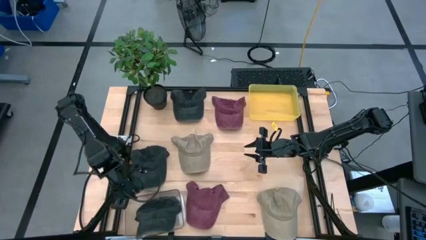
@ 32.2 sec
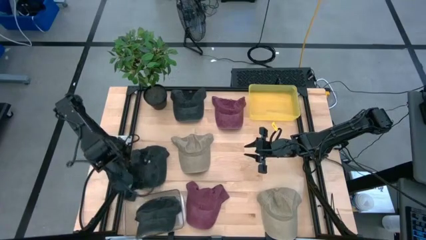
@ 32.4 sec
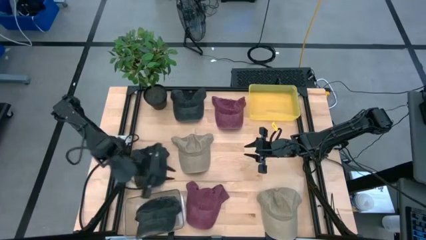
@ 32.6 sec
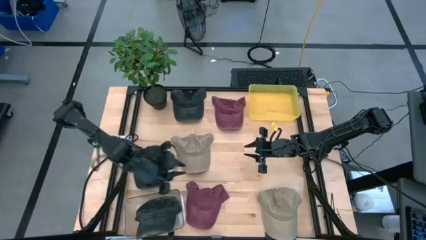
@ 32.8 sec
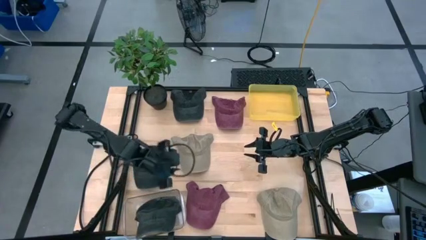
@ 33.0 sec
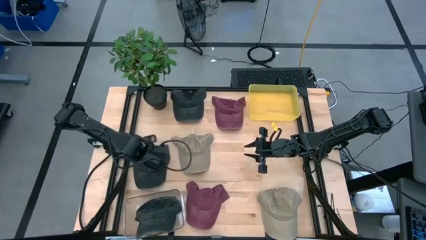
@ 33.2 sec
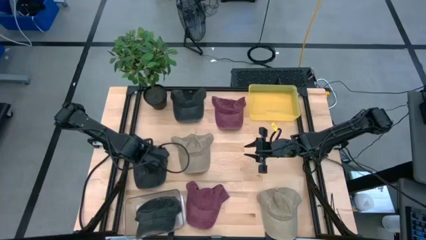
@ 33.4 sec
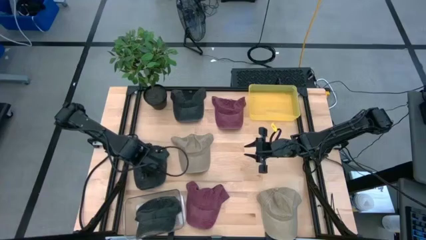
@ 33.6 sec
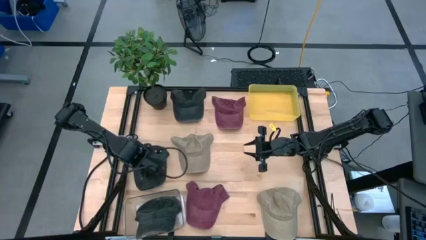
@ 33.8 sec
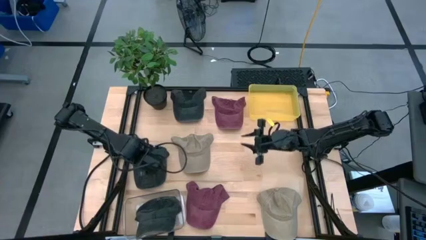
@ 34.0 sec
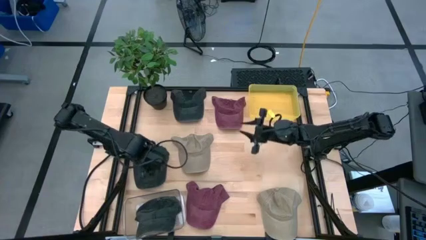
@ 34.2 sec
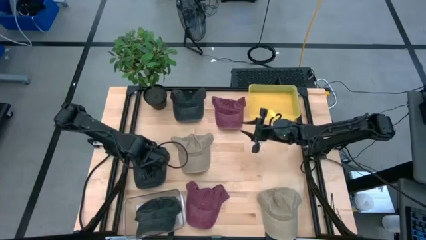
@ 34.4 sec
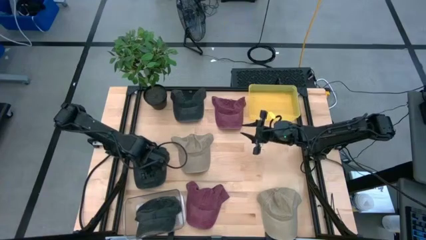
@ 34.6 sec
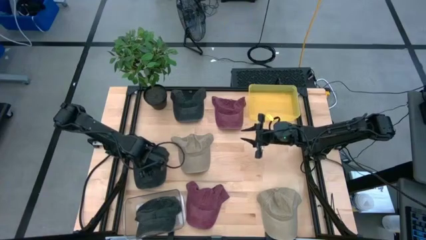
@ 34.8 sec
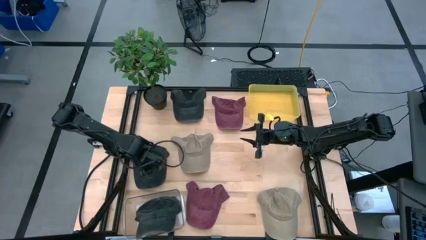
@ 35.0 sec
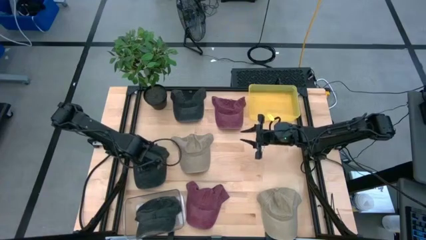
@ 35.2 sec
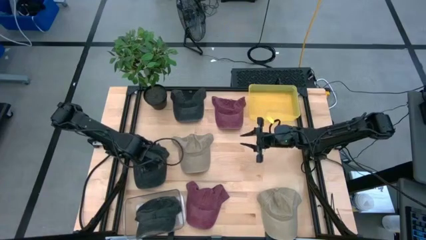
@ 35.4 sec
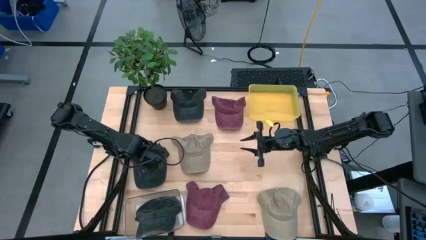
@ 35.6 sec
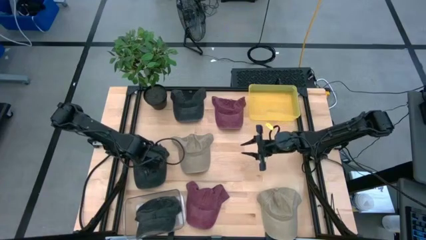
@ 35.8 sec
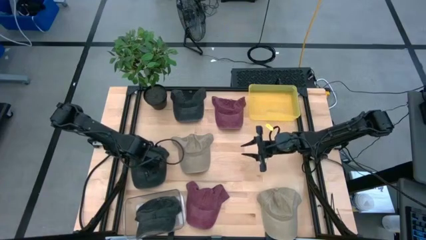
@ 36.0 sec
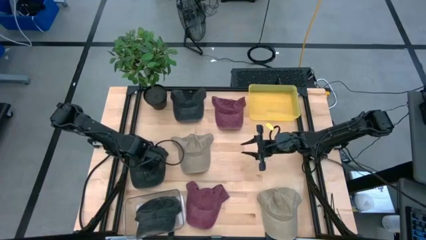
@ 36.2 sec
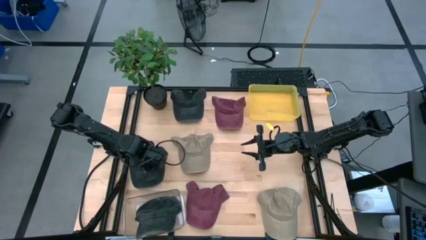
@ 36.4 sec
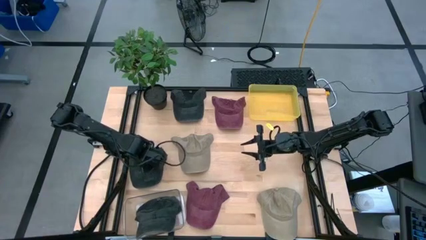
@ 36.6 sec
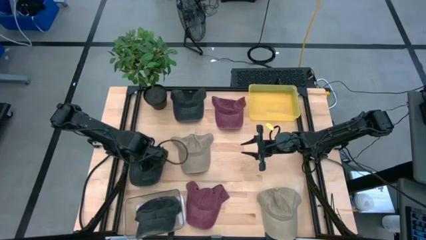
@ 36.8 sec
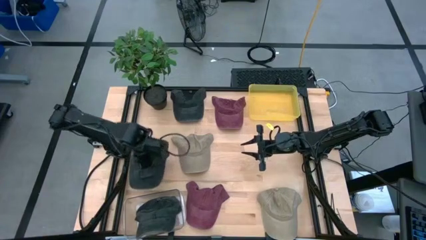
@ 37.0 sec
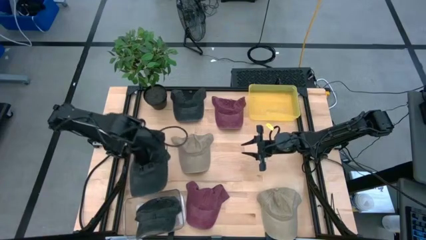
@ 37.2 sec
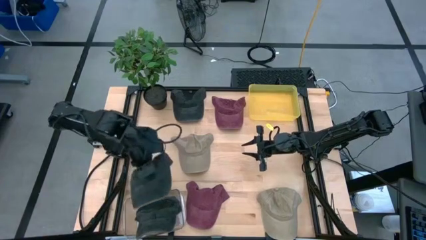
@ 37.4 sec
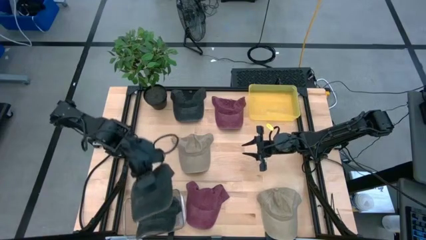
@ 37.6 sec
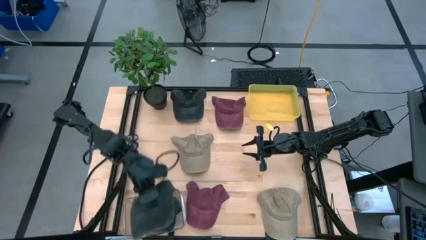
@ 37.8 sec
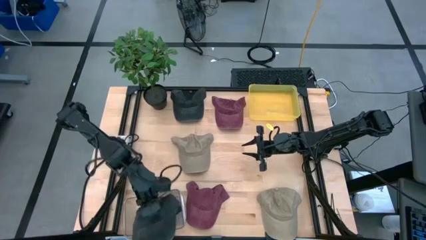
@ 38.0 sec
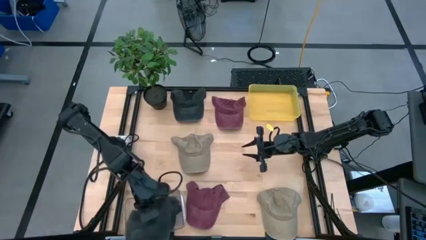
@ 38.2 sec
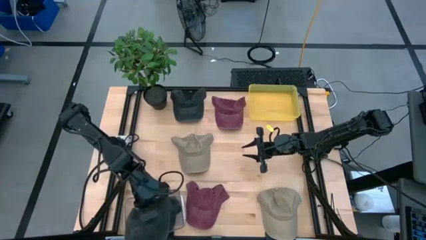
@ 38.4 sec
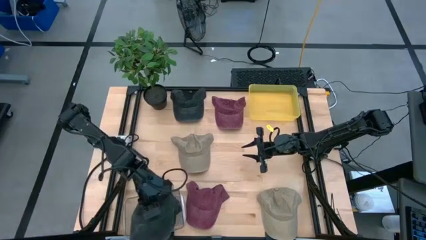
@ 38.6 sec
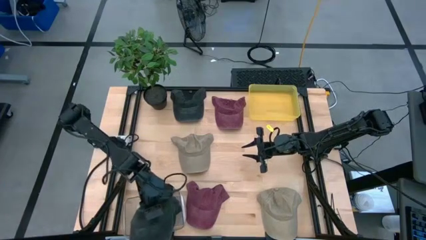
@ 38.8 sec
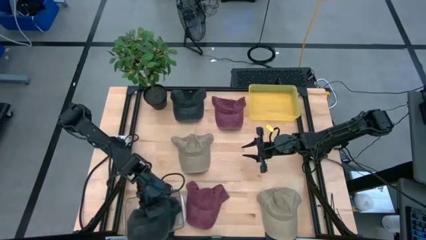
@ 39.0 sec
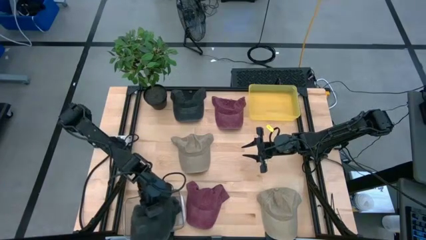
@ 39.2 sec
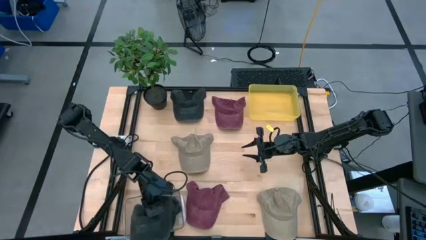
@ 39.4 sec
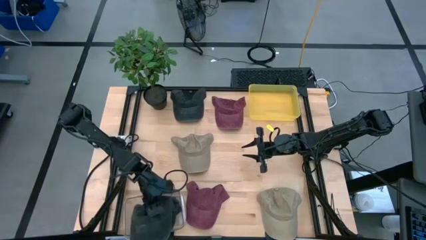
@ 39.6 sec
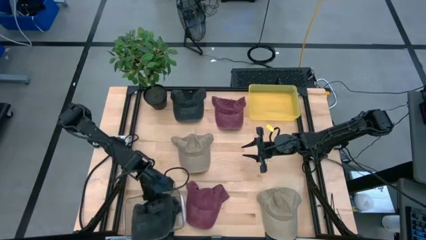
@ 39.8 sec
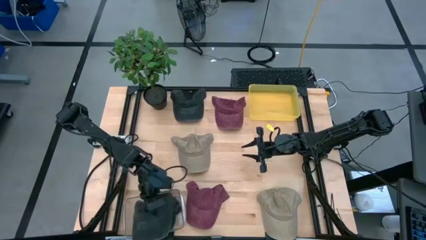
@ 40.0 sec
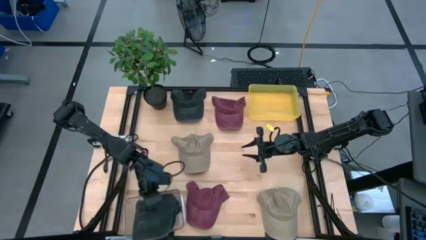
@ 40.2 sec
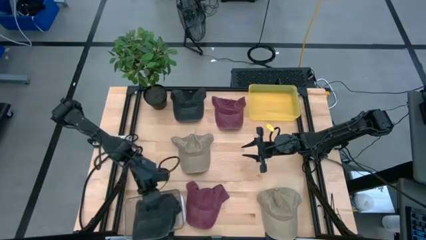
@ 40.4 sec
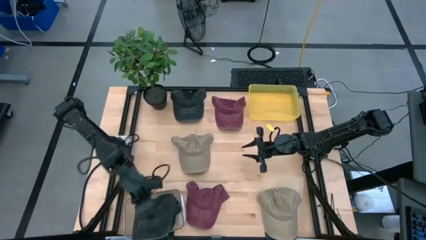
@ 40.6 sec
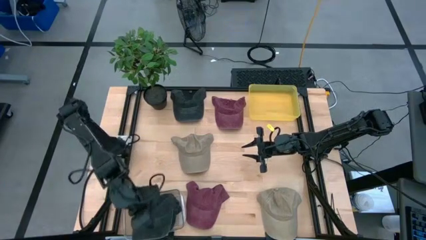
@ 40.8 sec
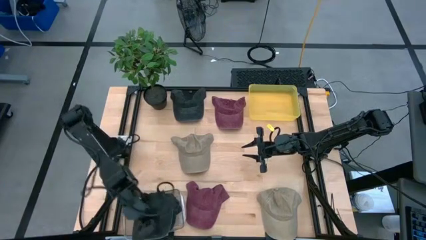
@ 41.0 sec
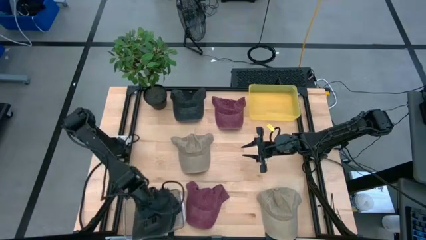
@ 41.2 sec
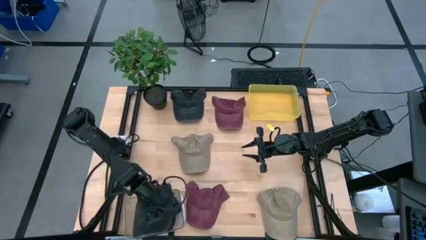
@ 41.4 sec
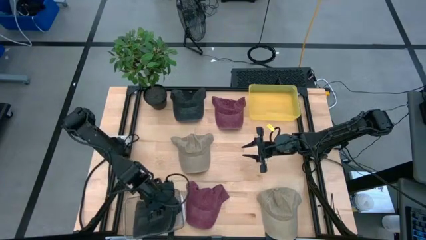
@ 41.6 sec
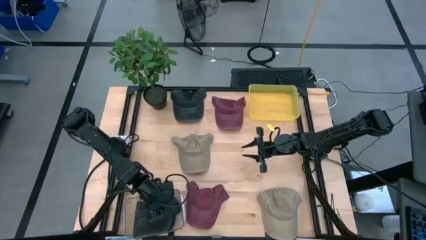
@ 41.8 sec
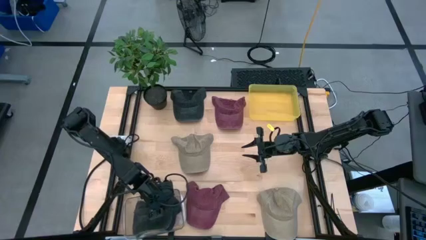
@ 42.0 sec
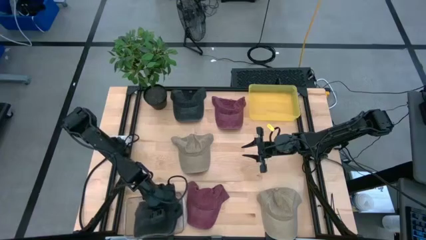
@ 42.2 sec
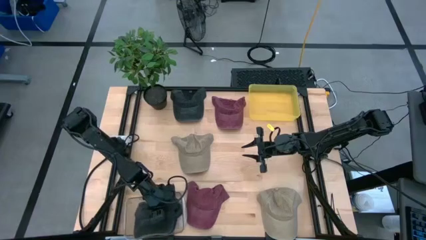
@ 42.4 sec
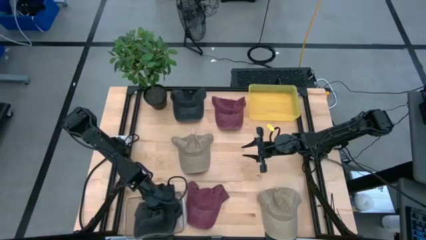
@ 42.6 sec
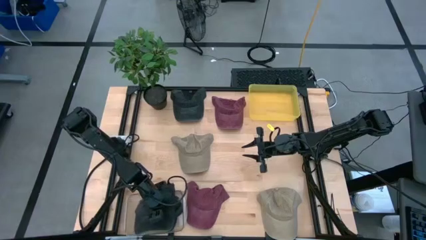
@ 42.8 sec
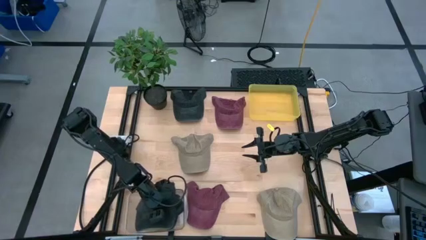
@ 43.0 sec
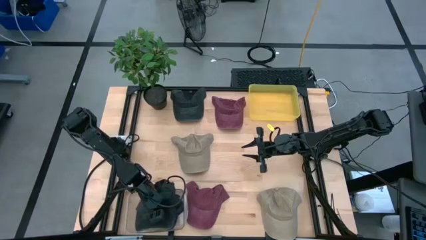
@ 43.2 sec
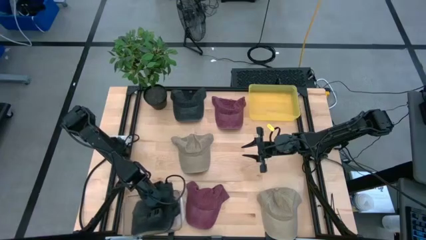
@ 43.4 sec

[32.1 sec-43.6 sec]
Task: Pick & Place hat
Put the bottom black cap into the transparent bin

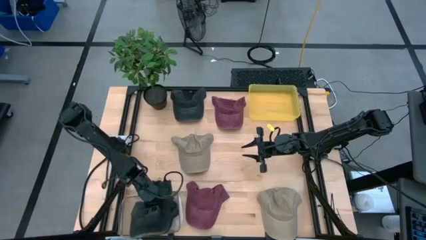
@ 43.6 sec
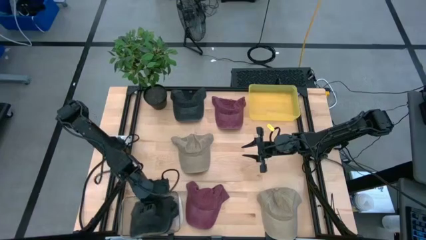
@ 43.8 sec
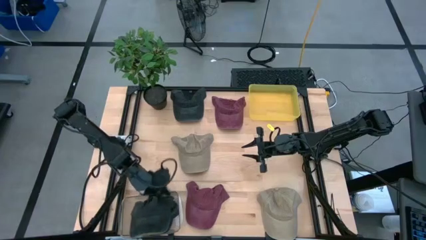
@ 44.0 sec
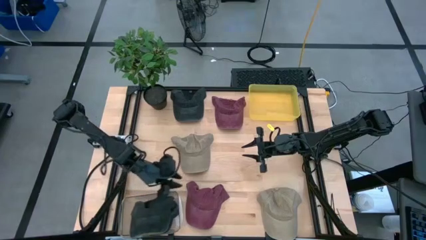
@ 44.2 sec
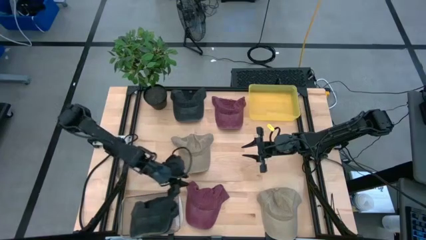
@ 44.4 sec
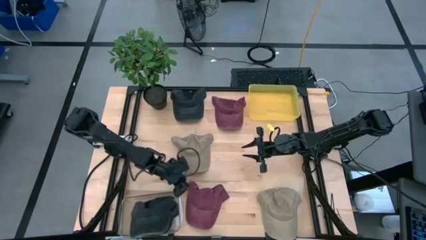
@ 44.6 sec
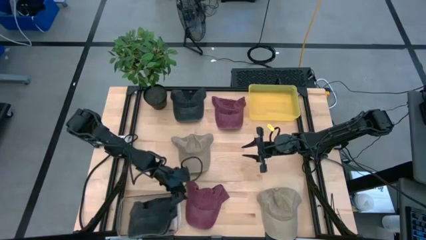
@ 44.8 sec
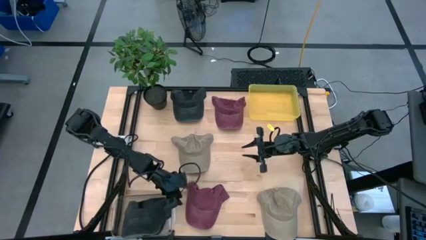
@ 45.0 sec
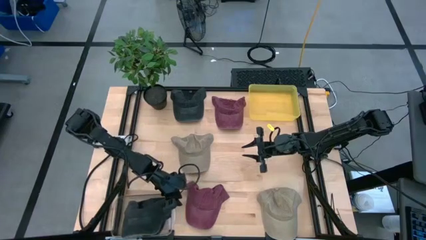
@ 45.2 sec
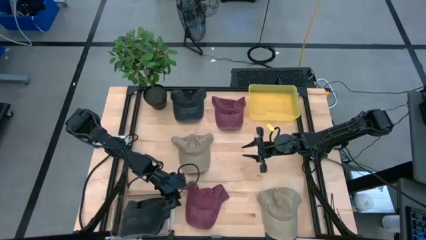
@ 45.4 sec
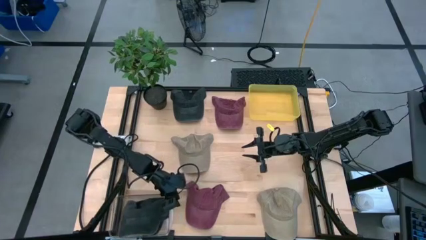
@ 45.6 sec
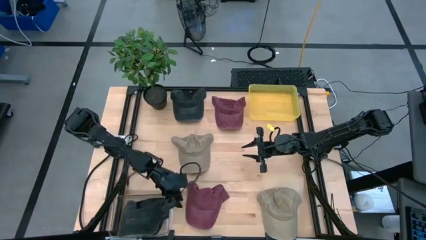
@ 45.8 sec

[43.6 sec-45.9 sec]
Adjust the transparent bin

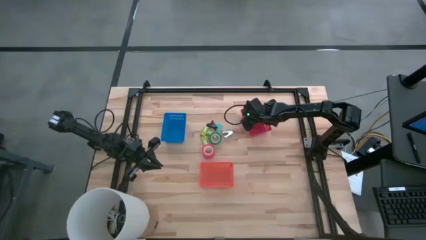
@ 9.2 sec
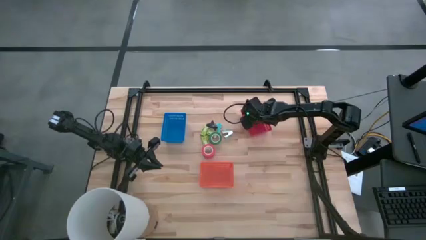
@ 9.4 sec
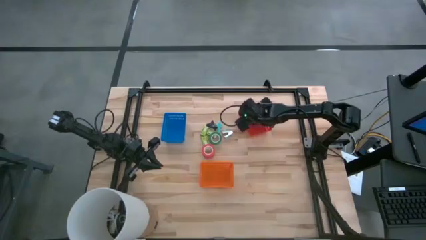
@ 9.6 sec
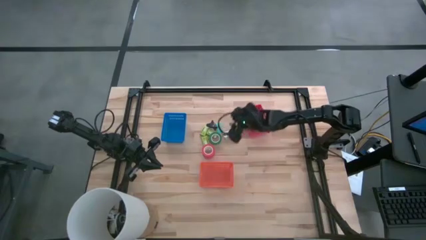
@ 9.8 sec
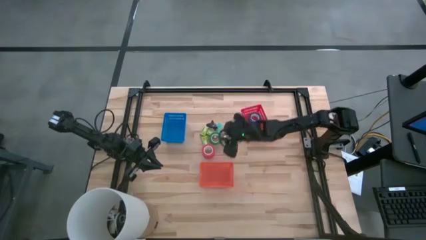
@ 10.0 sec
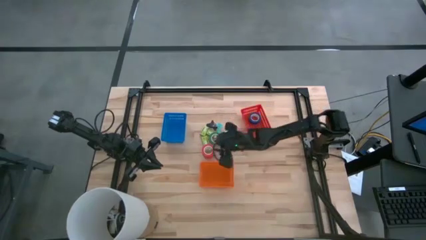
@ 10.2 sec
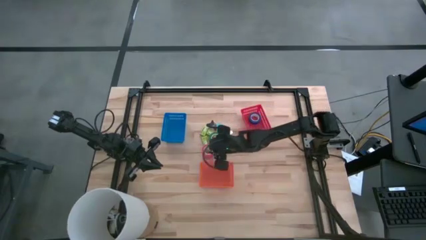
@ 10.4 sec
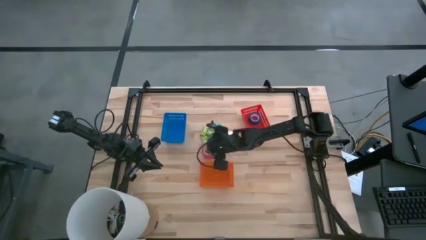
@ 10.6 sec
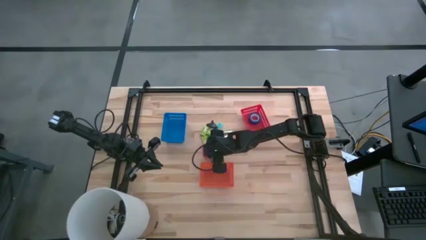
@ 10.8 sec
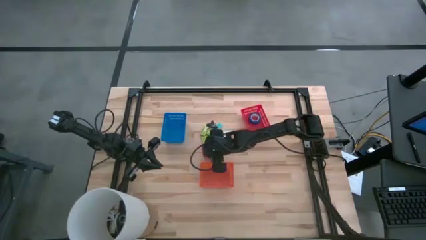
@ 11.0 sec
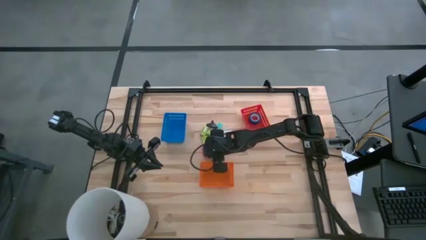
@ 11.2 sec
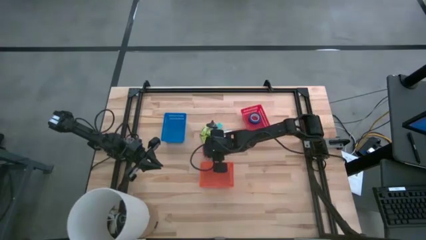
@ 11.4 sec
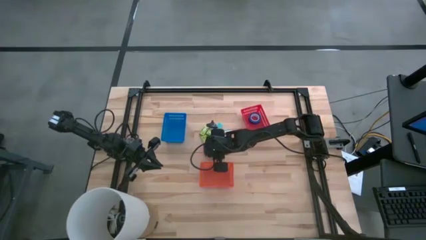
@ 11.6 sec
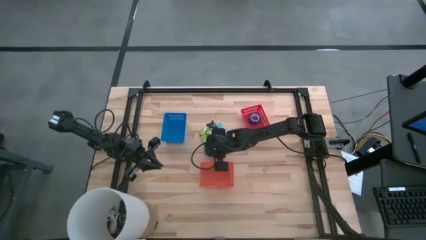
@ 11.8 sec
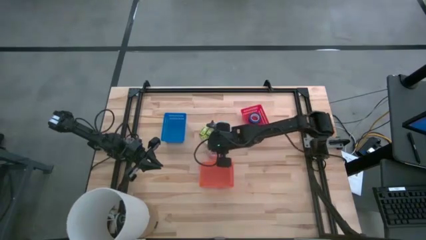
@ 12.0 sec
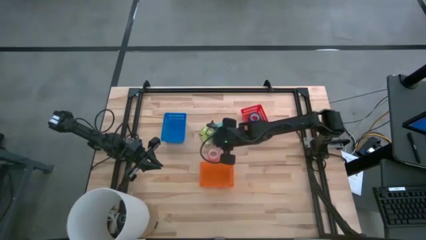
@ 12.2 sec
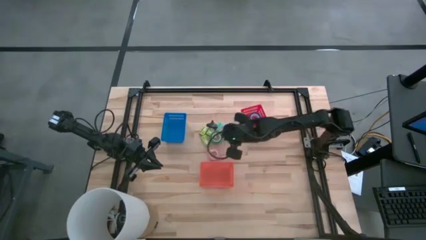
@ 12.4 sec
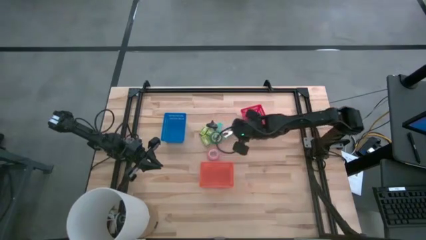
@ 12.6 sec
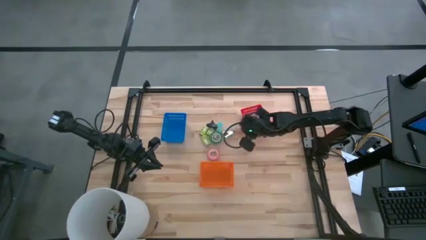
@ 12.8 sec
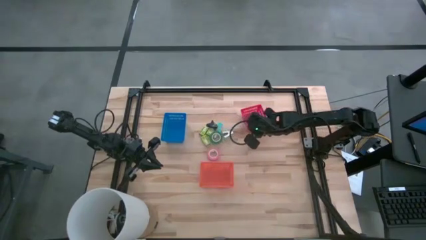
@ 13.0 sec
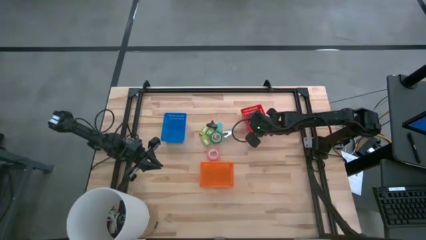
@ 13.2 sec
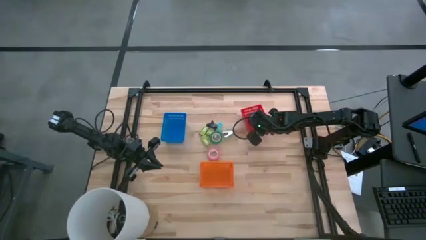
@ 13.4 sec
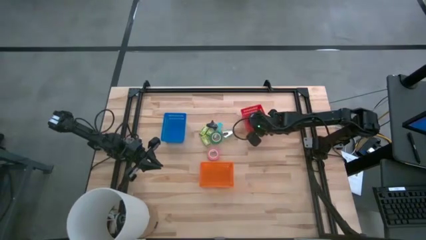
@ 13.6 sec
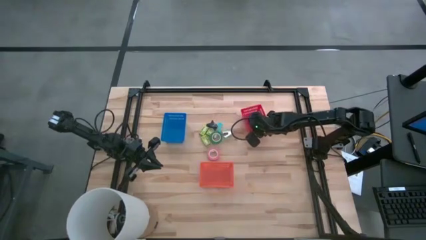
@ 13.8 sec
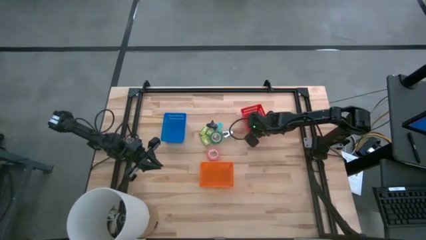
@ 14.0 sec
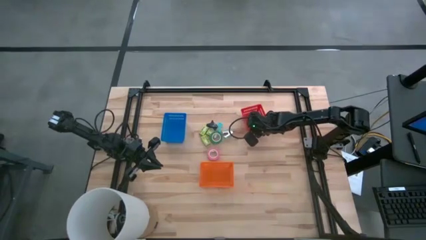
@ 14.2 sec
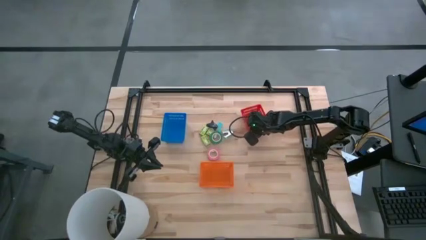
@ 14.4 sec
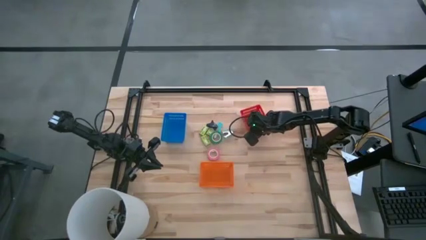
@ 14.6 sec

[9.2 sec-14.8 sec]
Task: Pick and place Stapler, Stapler remover, tape
Put the orange tape into the red basket
